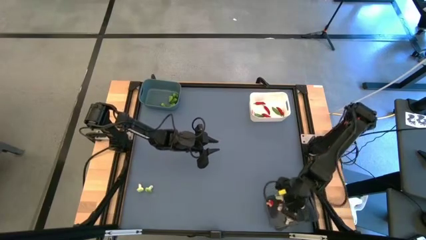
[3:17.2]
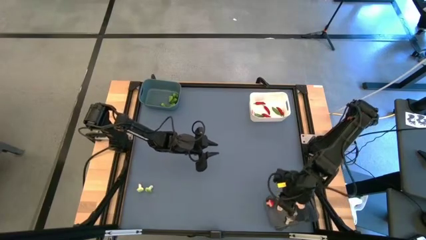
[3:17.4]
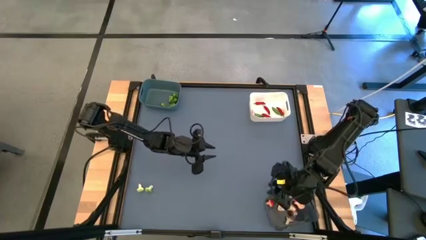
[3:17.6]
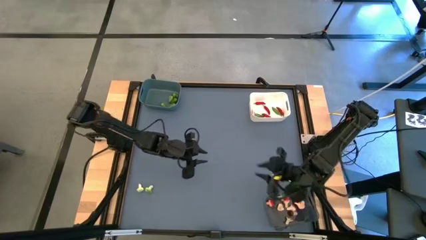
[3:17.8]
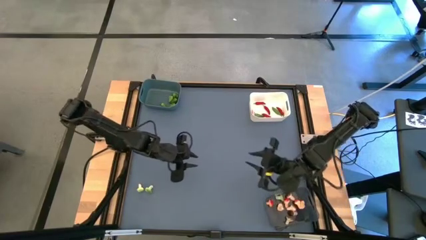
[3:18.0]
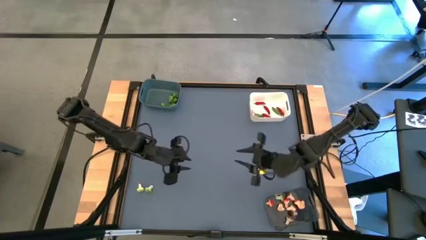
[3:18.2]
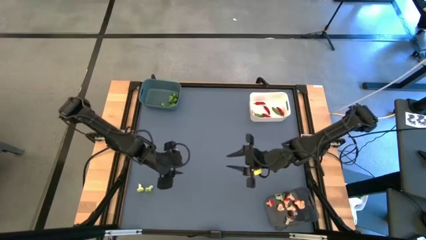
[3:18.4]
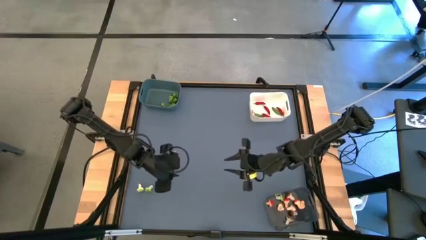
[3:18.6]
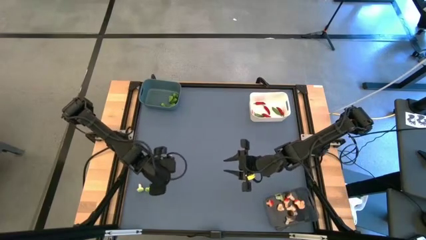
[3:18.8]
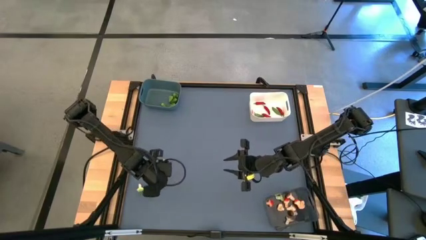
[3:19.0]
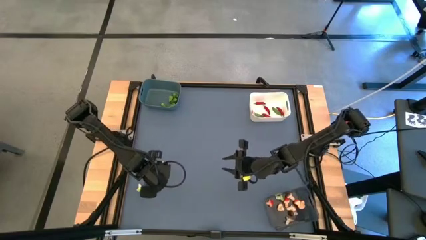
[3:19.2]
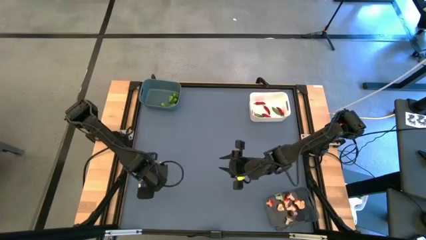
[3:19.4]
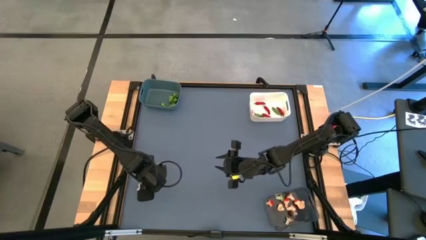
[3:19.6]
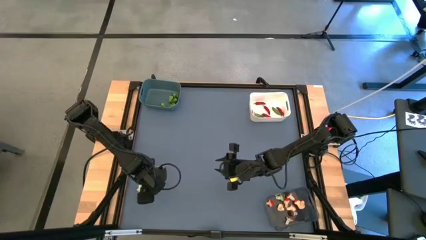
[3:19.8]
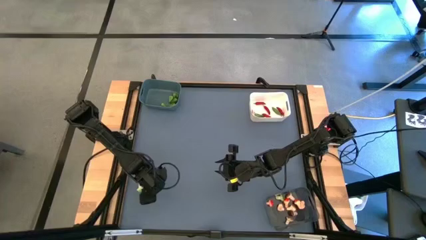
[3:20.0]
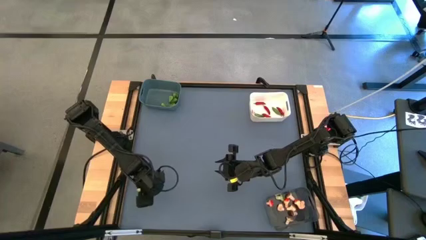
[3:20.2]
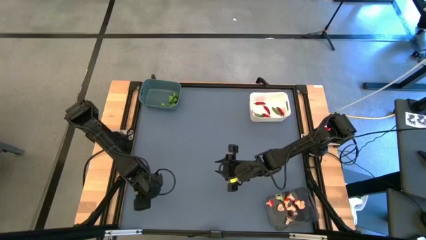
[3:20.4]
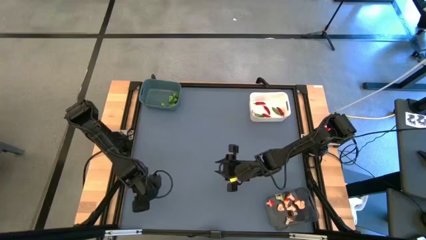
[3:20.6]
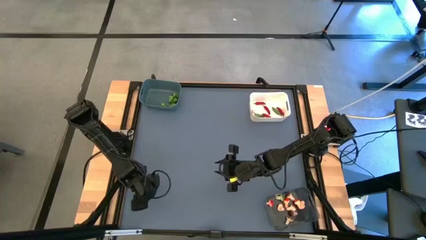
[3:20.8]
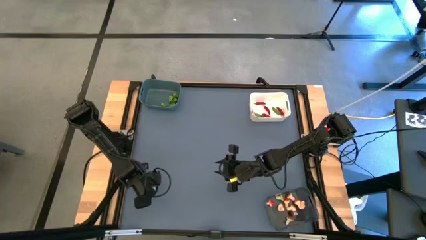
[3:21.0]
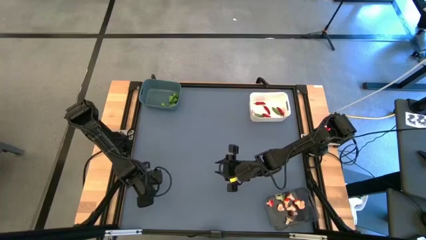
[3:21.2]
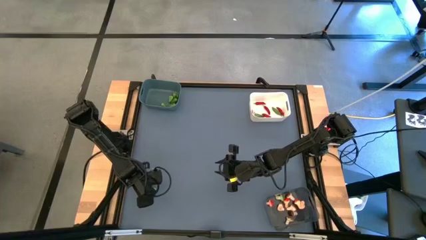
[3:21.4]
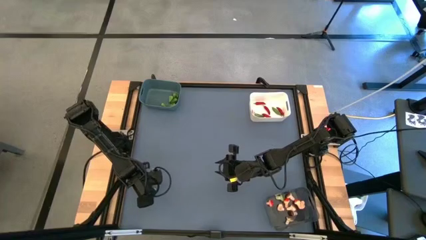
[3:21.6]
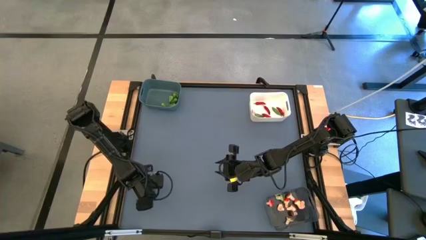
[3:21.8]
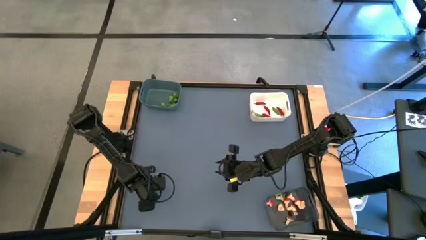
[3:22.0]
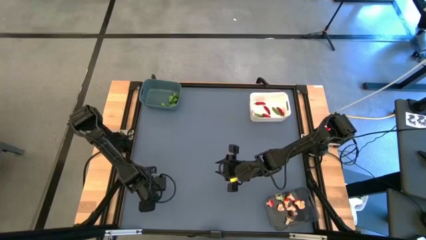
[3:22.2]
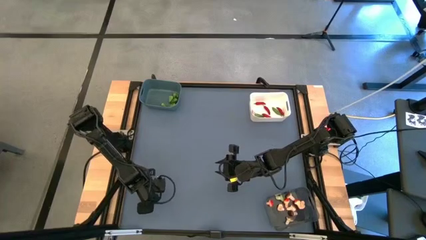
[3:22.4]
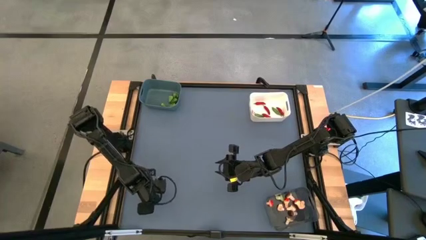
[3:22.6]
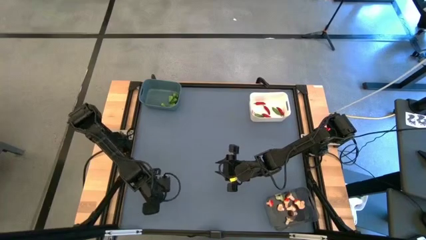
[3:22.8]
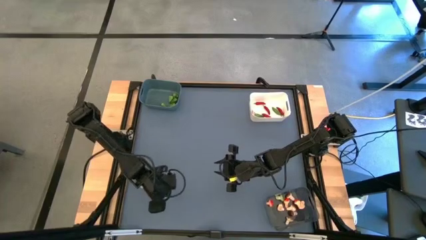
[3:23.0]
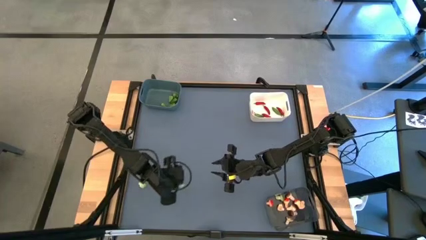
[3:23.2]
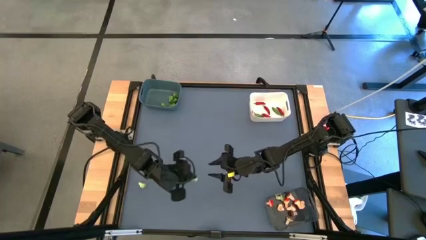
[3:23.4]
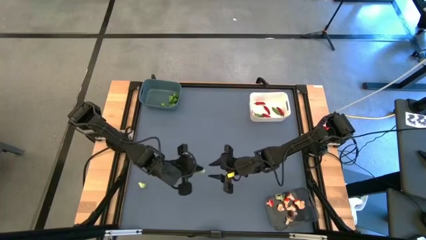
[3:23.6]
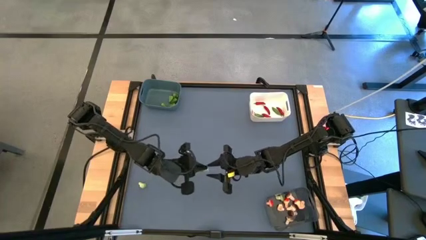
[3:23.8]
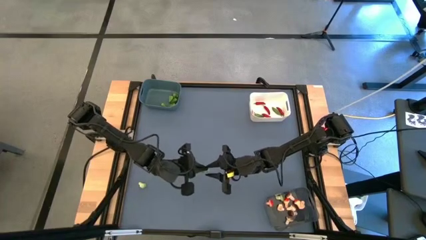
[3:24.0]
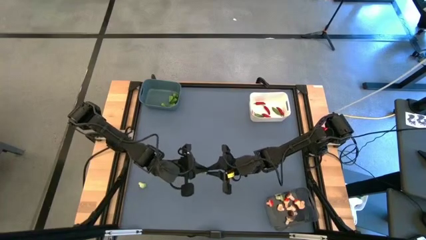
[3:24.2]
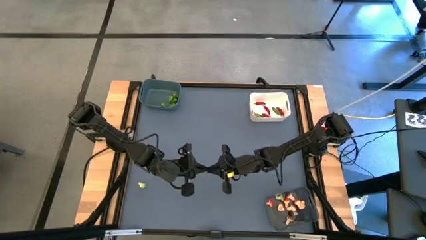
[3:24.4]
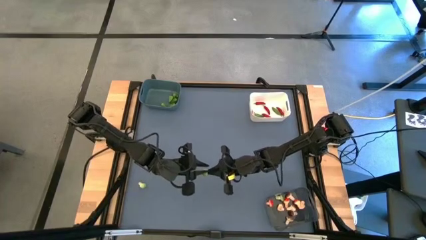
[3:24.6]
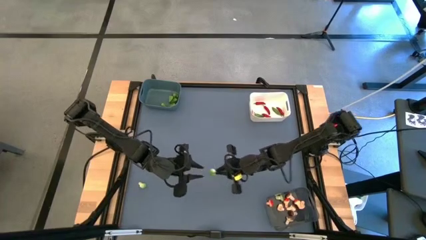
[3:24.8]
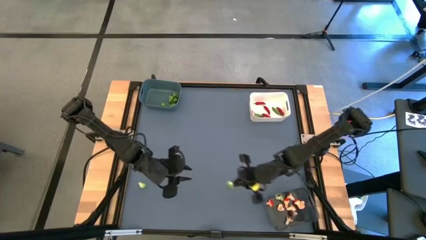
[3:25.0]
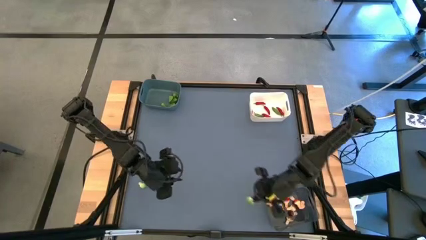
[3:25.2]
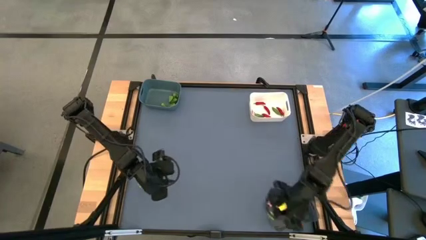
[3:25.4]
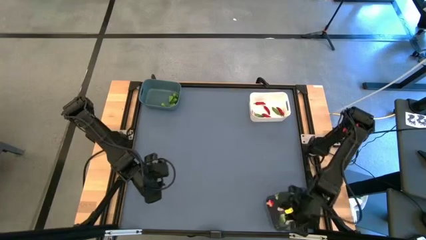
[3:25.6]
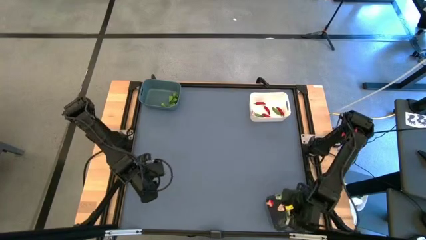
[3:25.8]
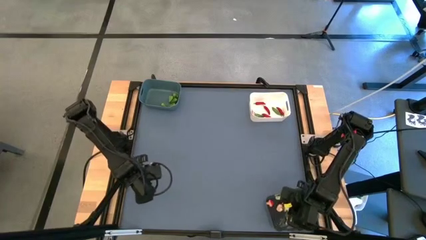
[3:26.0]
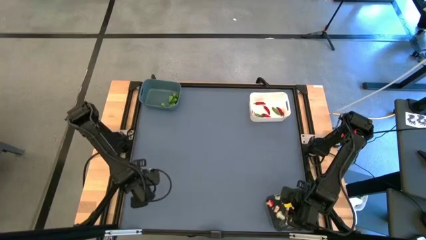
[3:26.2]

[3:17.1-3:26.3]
Task: Sort produce into baskets
Put the green mushroom into the black bin

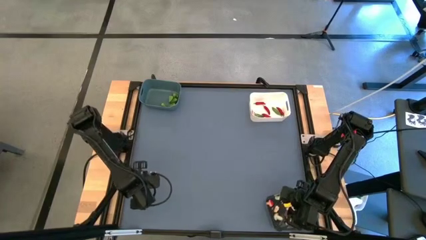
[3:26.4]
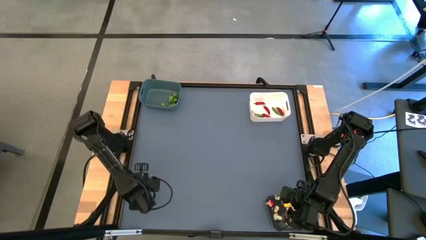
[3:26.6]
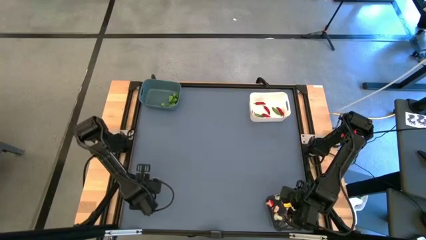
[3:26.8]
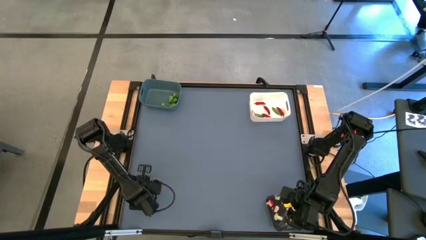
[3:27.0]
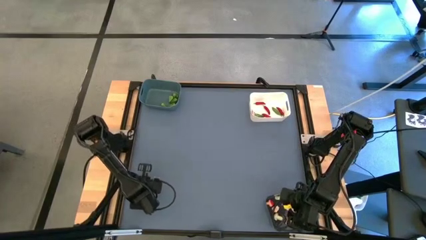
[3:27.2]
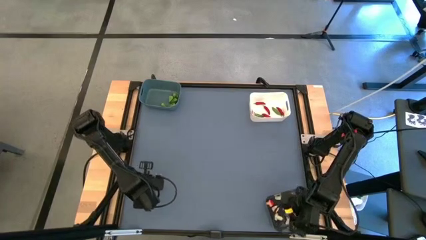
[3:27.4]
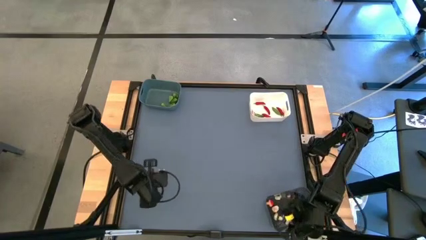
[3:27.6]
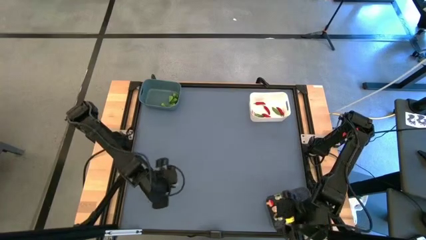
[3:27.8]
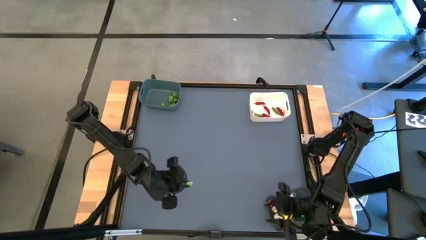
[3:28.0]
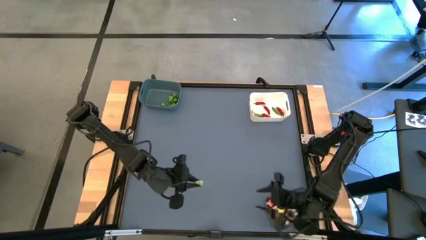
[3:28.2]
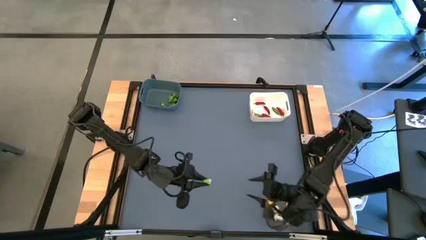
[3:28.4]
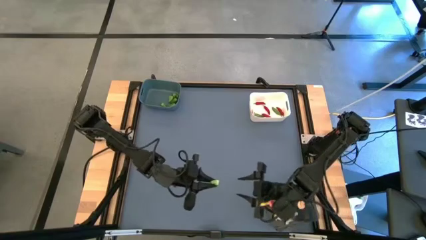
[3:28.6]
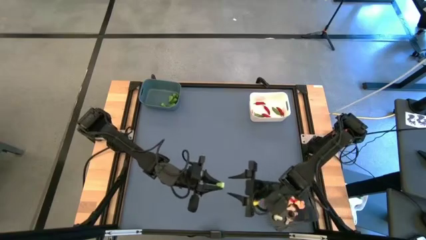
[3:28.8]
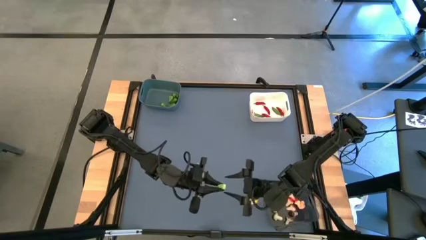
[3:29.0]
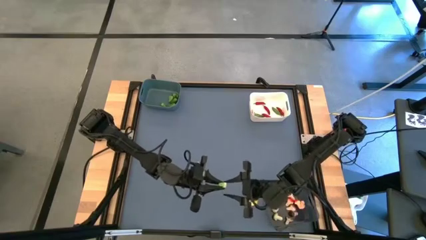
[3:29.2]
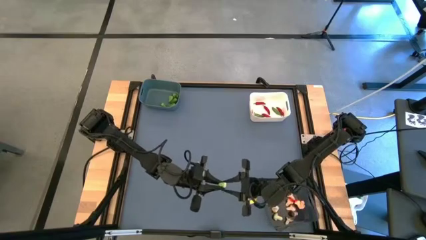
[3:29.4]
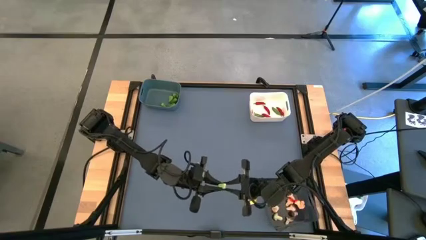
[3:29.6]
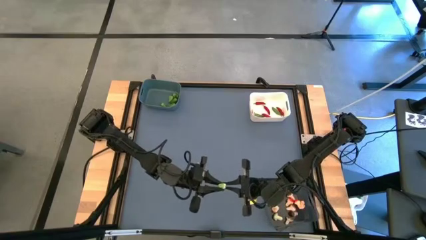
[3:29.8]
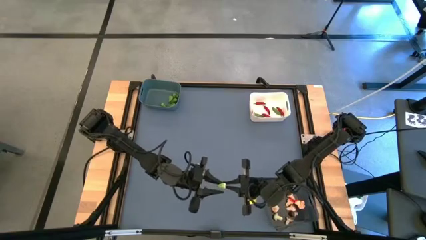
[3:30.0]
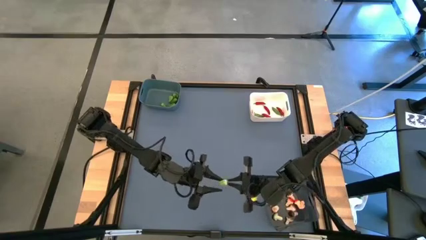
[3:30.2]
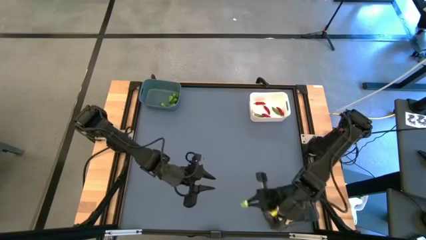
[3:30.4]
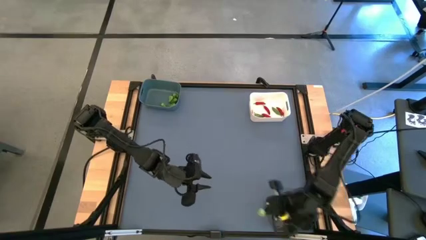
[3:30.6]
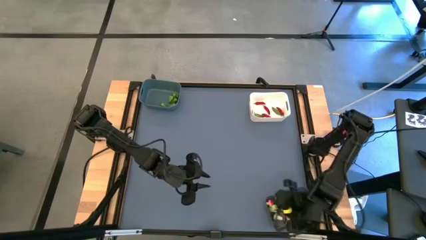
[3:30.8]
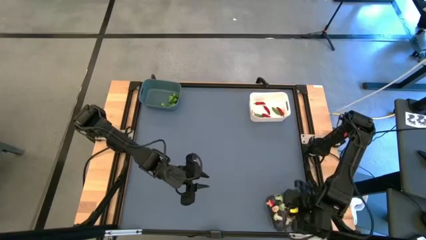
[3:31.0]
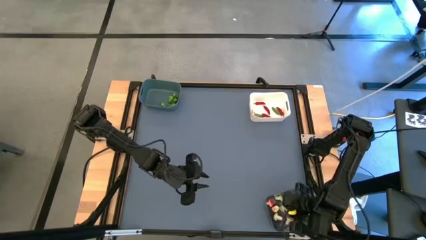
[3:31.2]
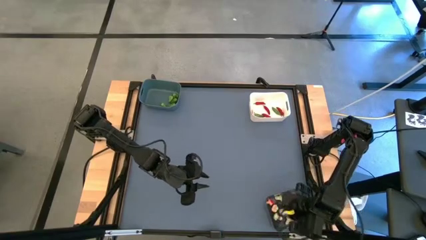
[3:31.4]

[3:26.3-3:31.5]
Put the green mushroom into the black bin

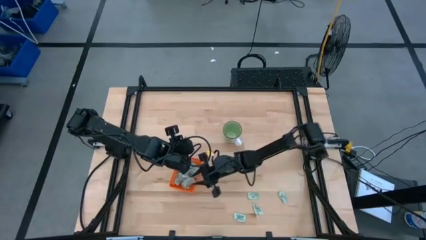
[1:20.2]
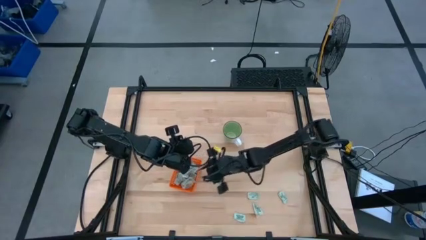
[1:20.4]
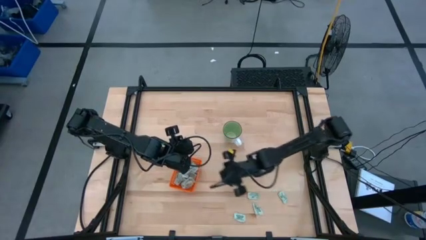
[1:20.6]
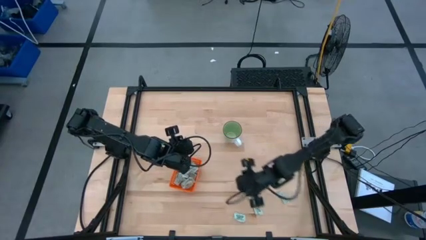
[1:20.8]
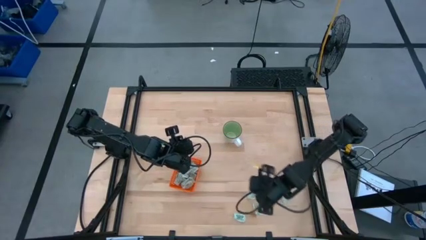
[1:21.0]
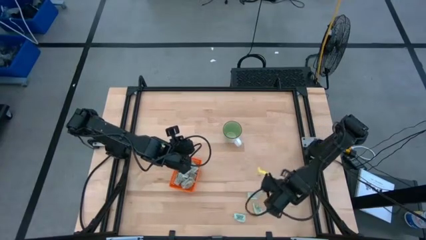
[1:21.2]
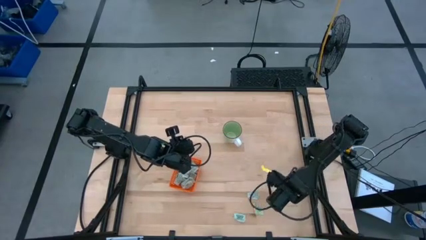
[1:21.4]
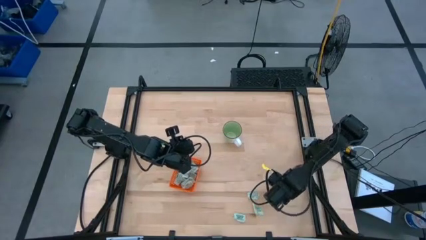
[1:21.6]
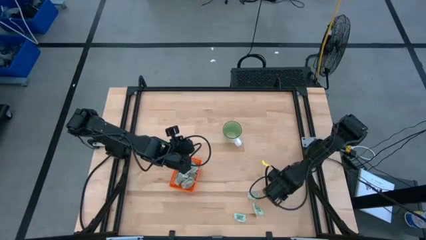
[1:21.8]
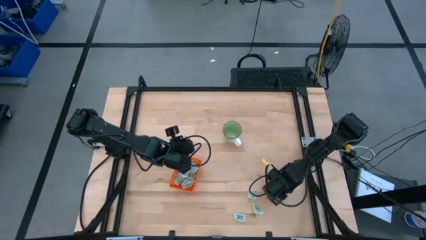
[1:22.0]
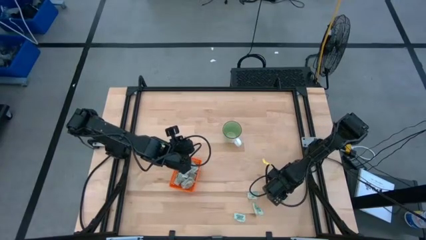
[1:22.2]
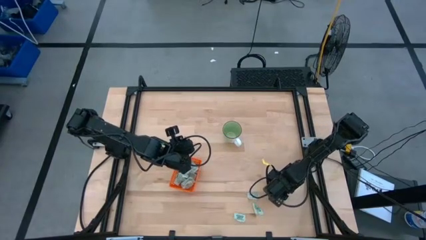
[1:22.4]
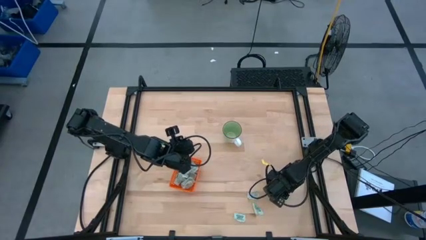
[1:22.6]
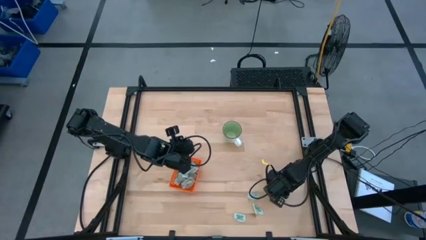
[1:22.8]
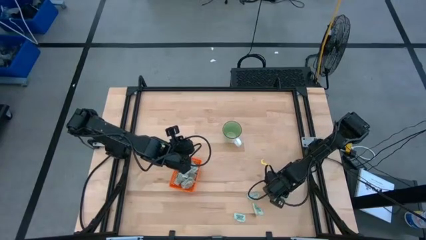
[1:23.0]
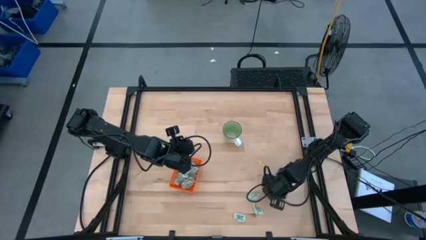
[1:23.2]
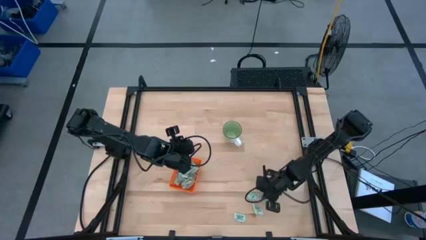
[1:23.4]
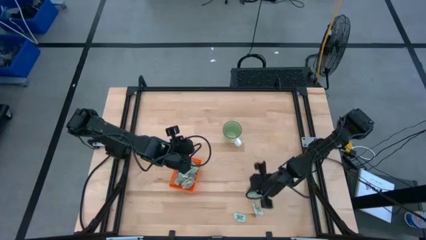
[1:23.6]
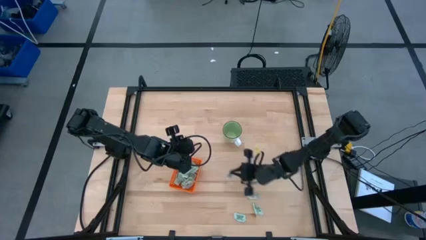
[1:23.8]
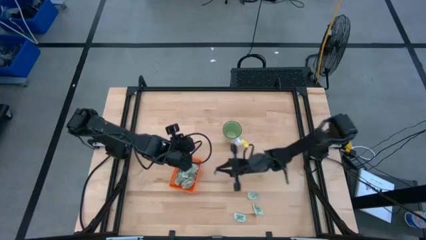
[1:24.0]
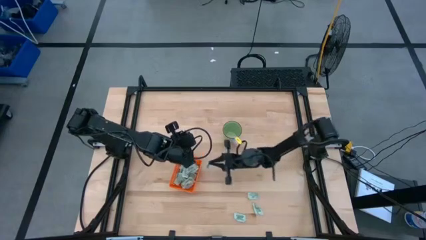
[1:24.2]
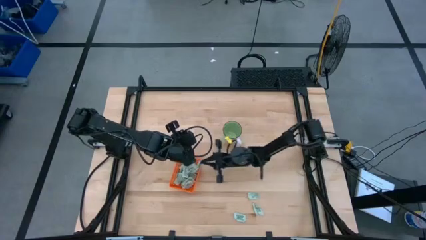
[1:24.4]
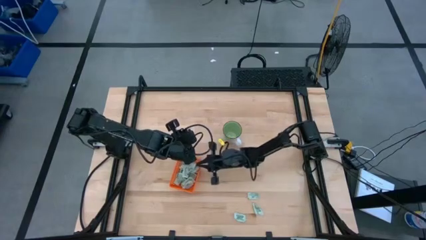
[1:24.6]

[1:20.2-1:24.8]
Task: Pick and place Stevia / Truvia into bins
Put the light green stevia packet into the orange basket
